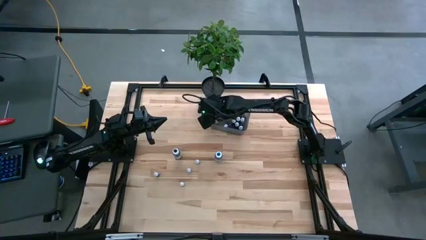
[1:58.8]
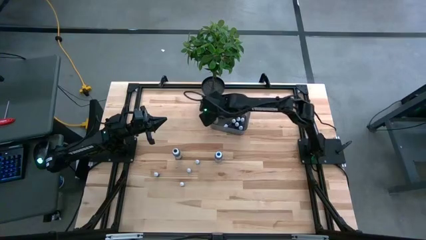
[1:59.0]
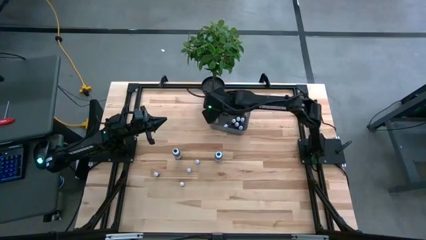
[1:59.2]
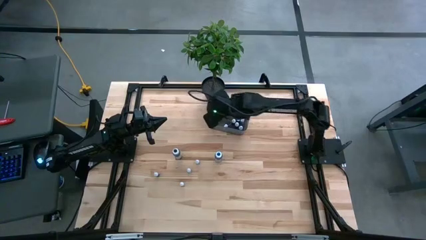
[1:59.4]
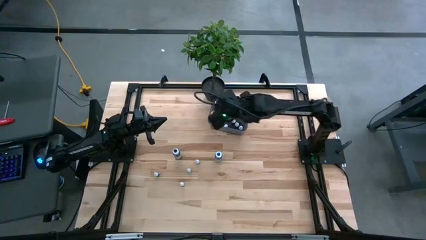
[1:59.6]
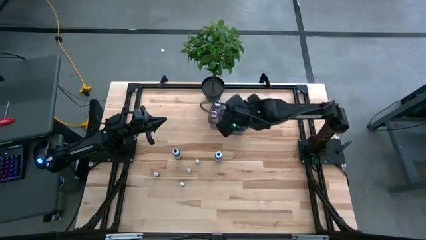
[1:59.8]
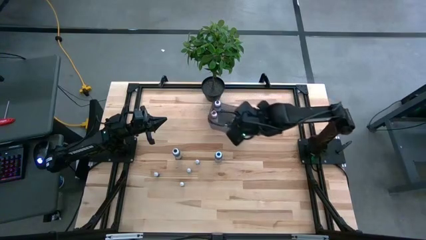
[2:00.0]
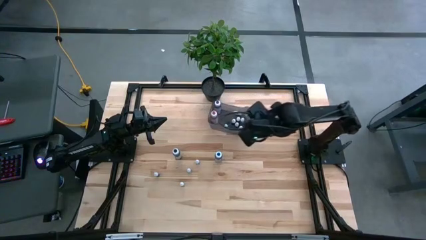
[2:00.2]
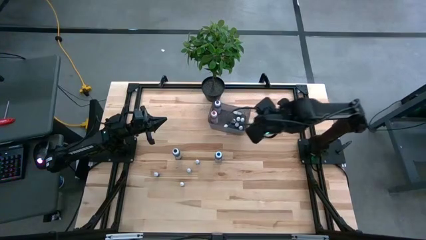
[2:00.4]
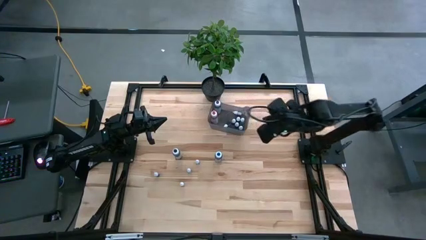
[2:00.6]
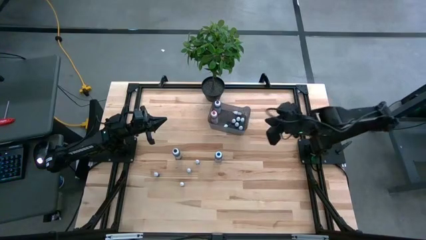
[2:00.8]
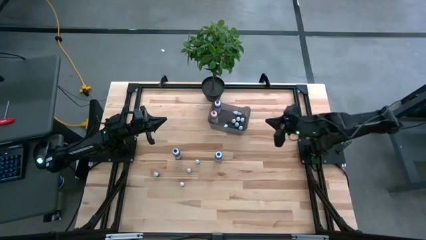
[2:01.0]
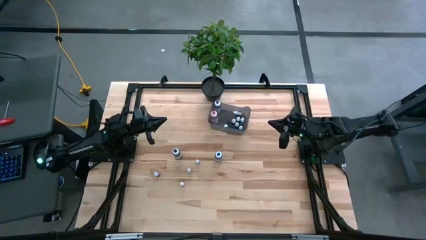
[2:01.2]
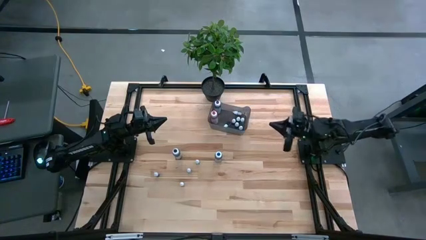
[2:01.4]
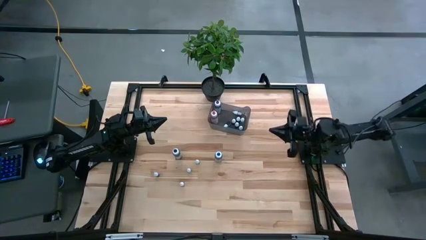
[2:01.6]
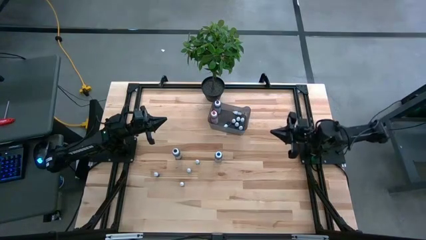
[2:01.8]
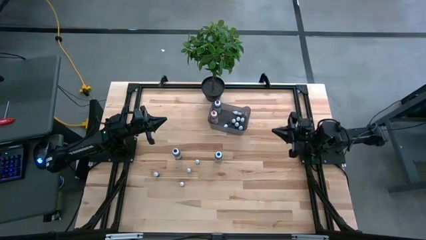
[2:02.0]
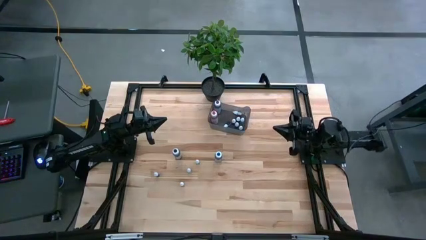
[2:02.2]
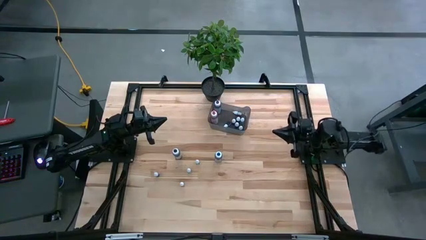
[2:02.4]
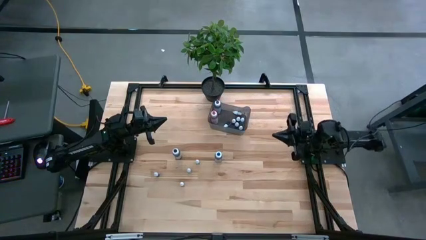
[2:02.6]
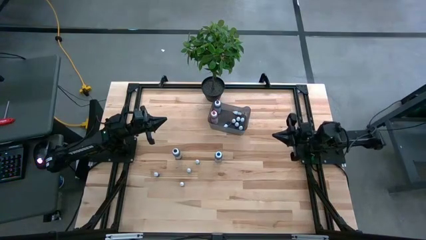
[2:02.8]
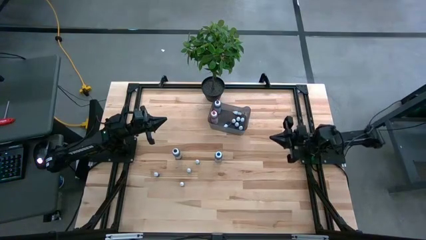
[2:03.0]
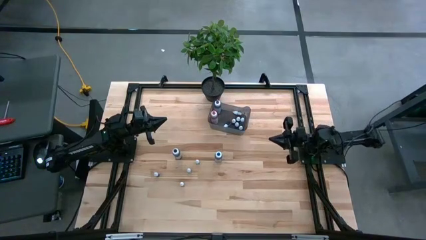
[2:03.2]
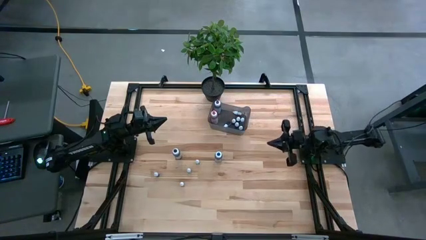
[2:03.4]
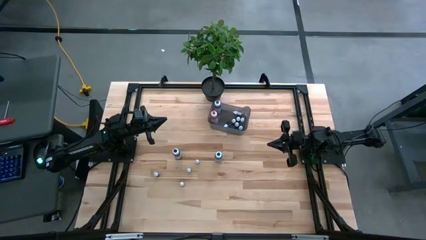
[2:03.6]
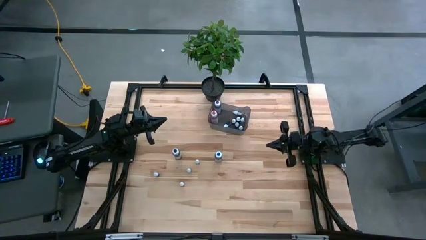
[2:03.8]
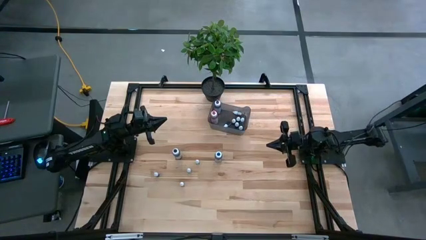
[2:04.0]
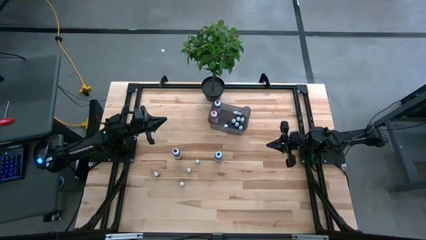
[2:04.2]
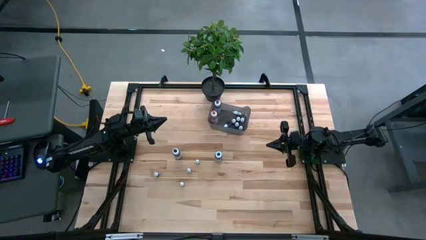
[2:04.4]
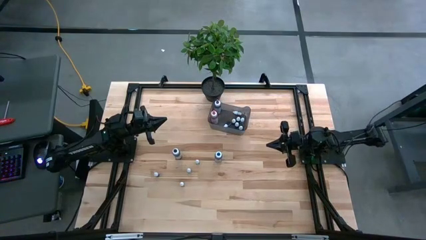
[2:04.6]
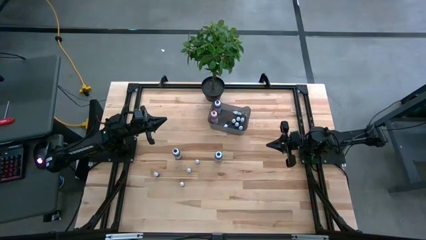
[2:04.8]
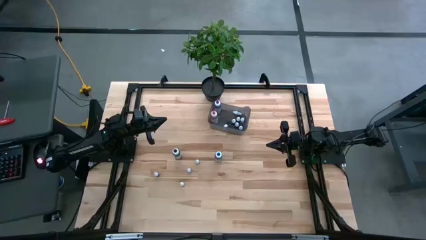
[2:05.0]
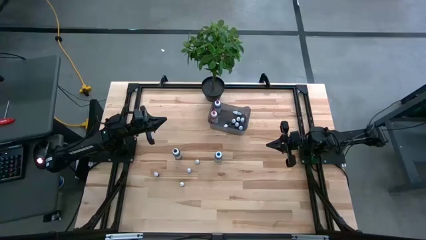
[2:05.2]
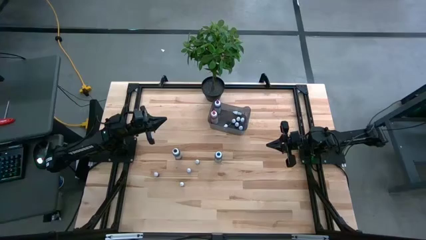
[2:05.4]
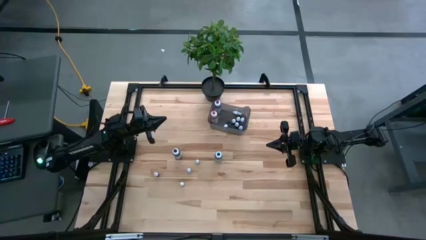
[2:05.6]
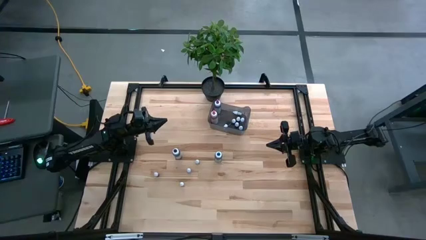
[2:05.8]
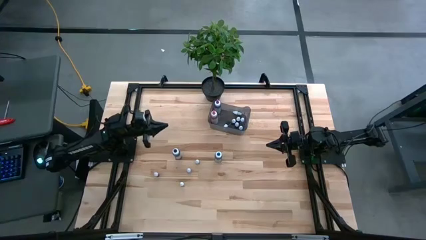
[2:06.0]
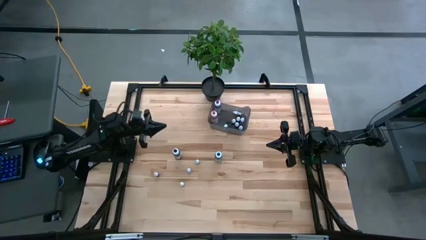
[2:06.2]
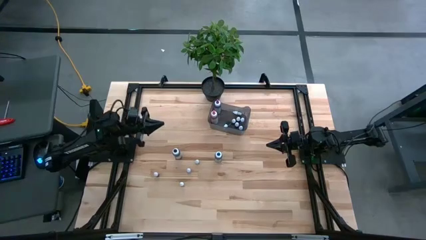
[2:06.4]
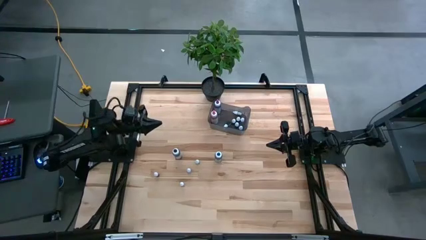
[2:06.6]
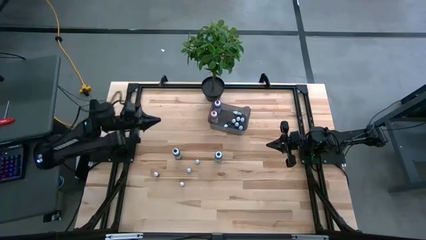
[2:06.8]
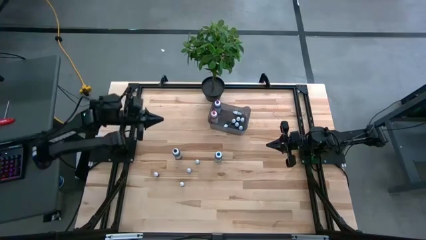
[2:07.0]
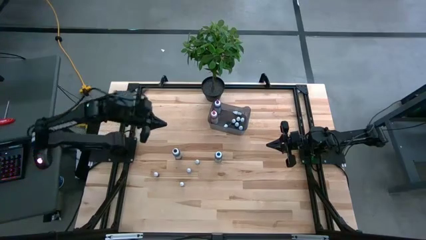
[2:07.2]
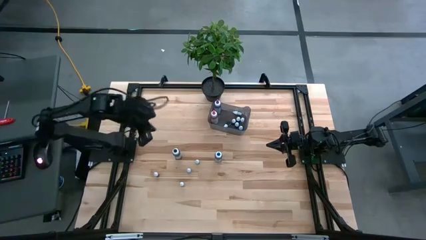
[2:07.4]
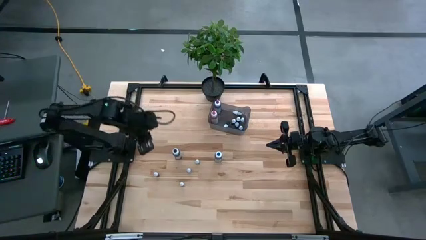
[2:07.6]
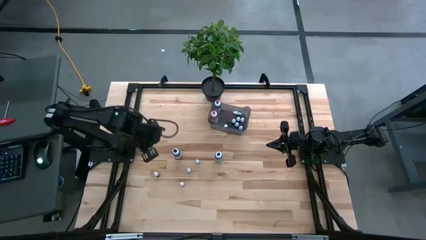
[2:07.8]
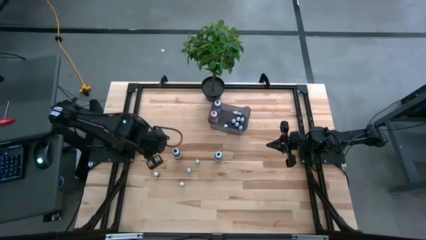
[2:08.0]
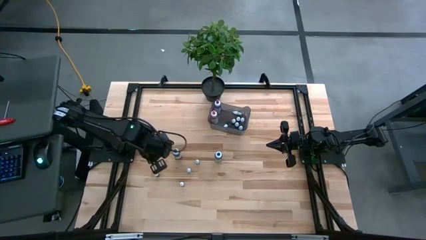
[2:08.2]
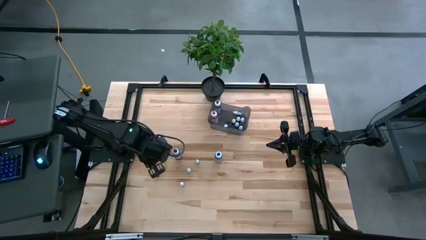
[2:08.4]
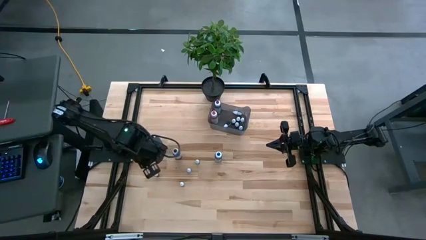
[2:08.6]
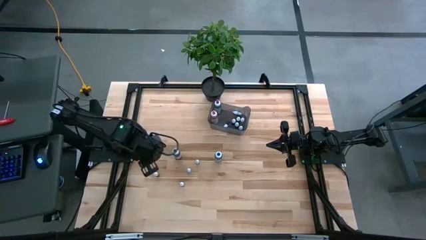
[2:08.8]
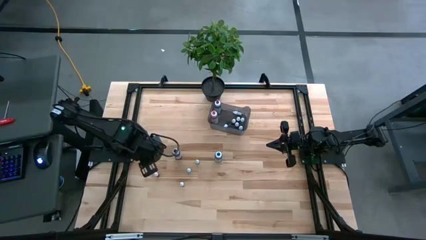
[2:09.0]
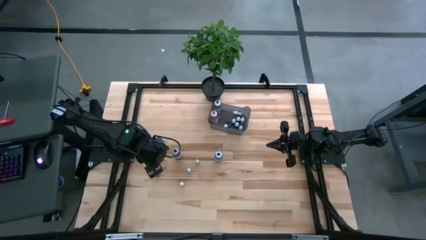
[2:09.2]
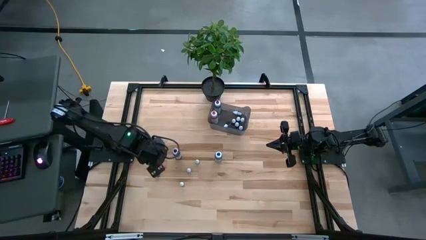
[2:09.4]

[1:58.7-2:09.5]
Task: Pick & Place food coloring
Put the small red food coloring bottle into the black bin

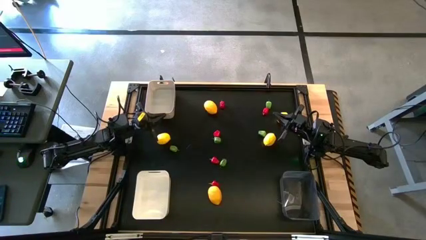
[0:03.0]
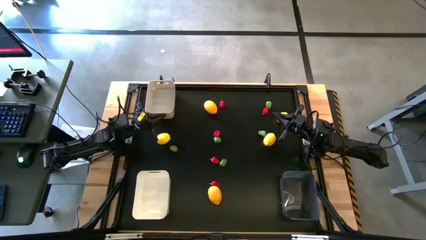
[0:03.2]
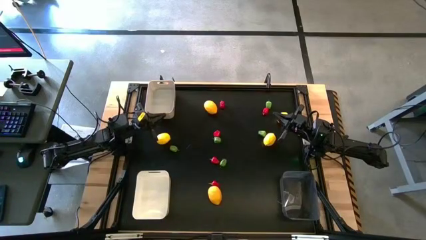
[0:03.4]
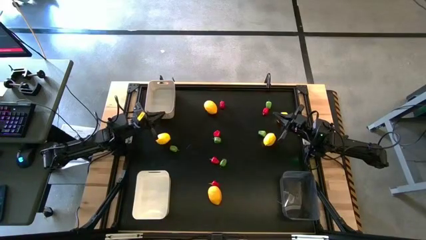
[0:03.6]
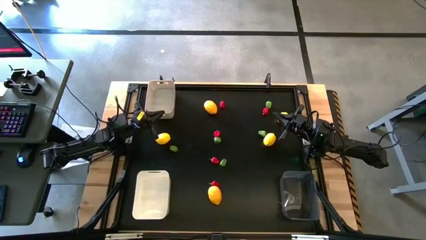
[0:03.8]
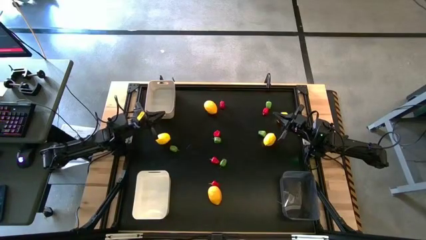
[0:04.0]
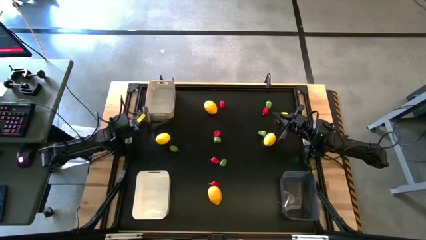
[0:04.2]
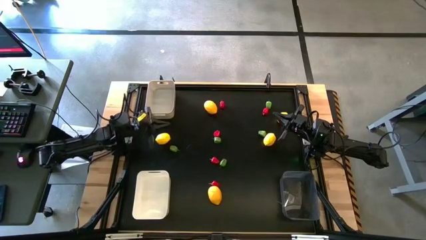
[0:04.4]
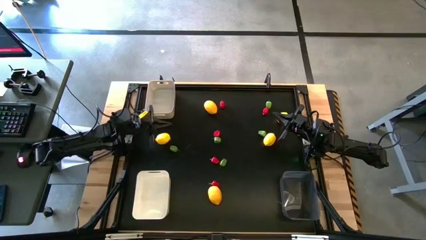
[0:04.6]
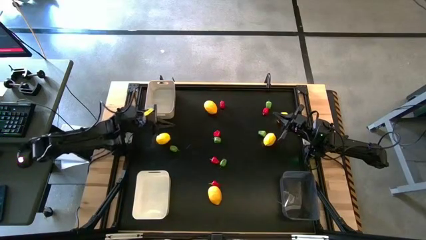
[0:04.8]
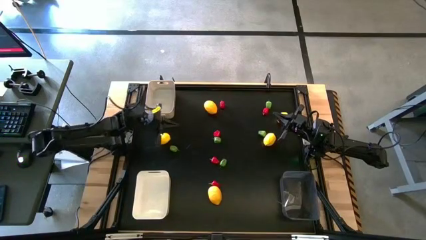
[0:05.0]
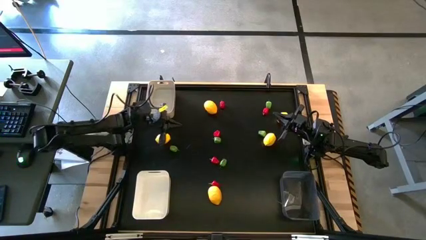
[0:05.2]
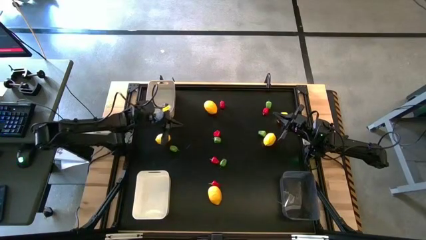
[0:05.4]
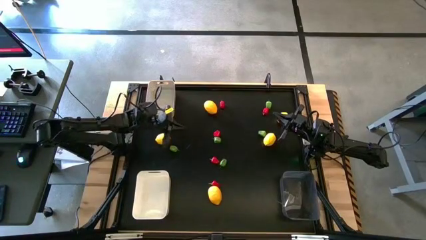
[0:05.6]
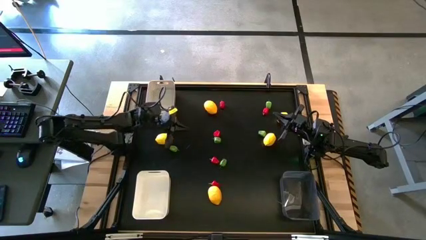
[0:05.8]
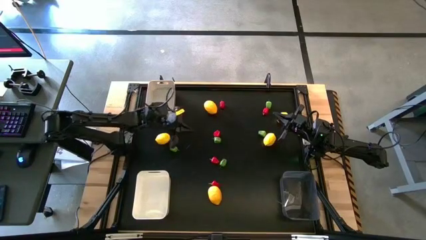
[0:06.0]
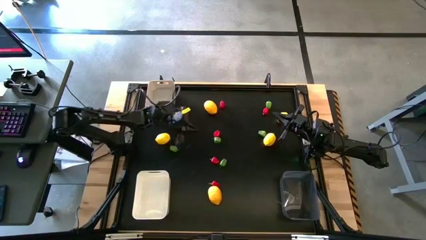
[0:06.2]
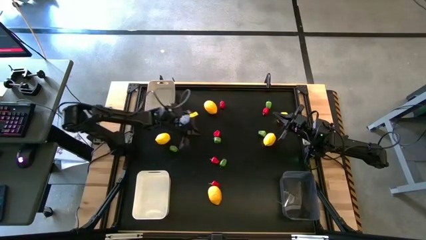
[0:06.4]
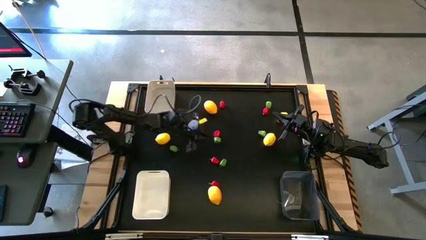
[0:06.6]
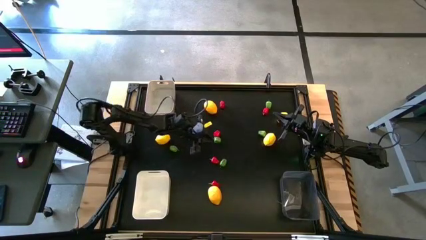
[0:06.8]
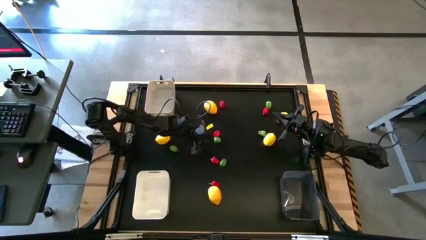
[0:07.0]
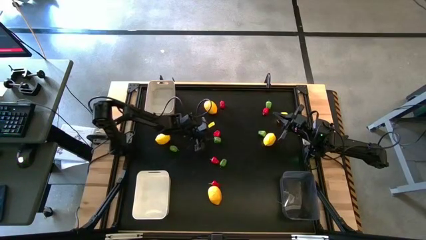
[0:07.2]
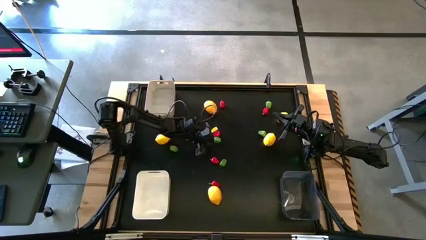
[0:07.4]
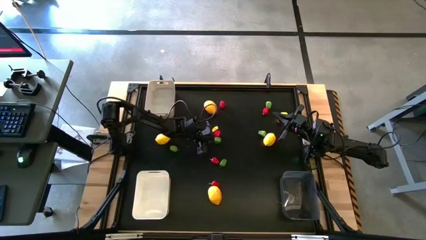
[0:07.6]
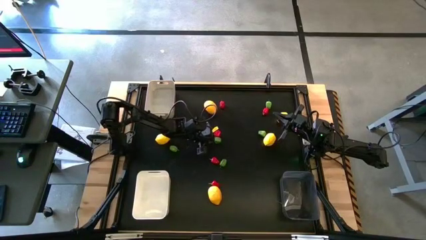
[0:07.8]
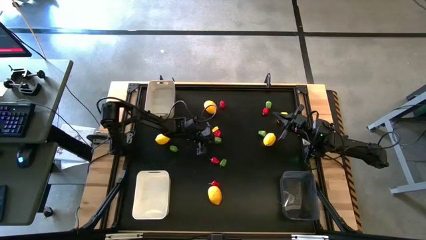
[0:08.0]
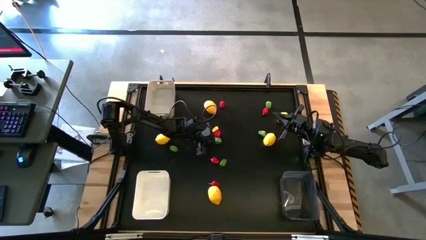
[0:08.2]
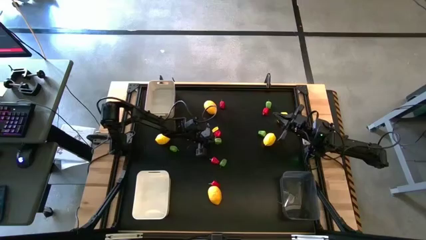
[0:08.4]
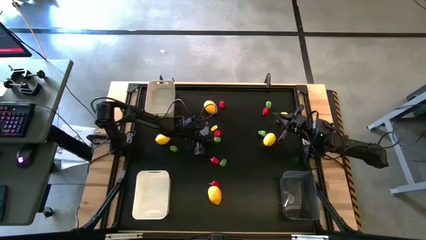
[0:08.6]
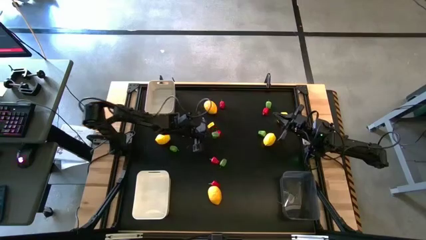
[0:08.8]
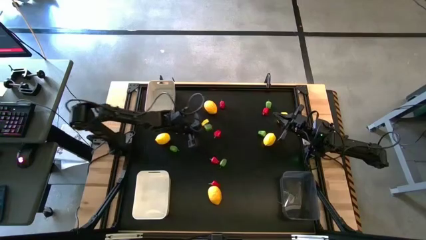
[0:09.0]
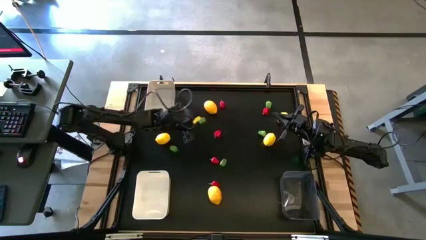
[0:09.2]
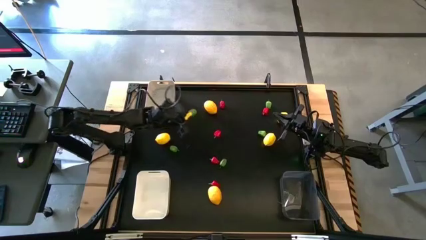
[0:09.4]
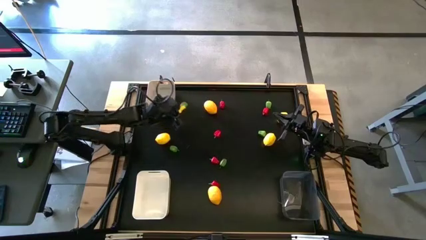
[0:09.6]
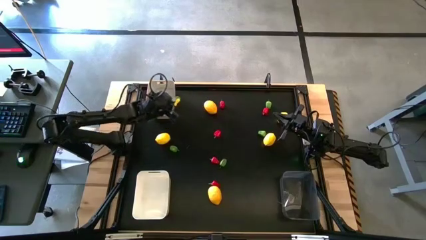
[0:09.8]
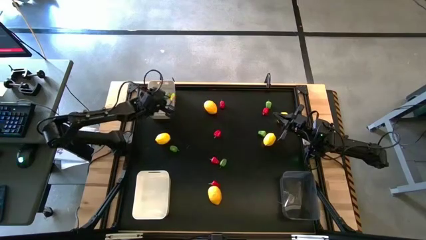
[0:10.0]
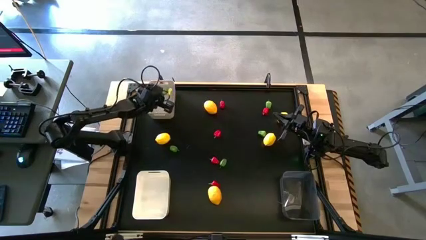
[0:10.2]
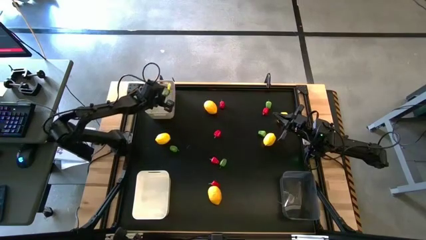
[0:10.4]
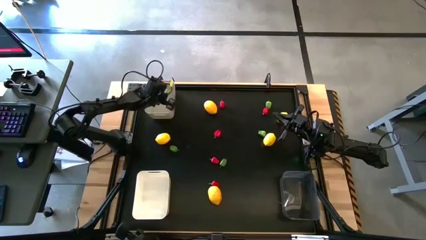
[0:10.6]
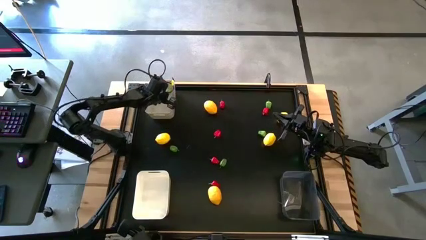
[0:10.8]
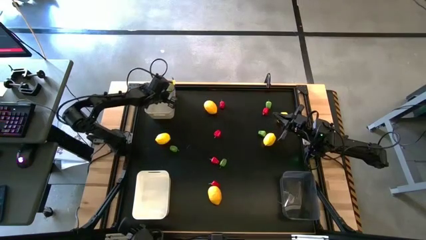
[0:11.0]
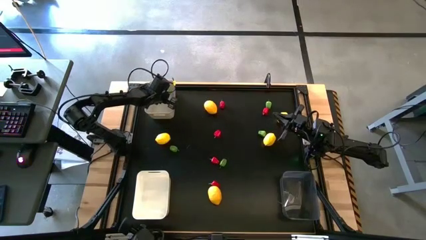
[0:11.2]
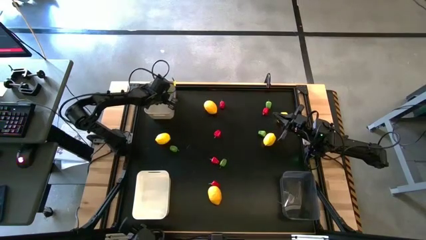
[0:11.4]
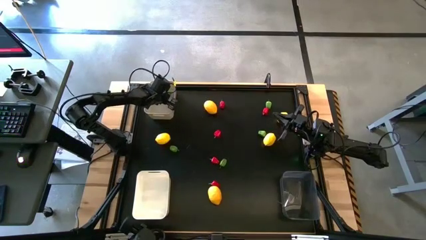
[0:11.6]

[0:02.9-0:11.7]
Task: Sort produce into baskets
Put the green chili pepper into the gray bin
